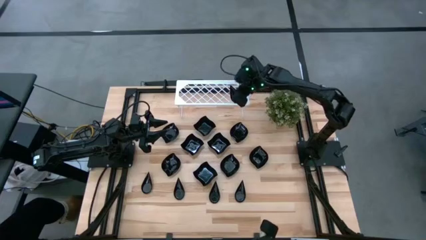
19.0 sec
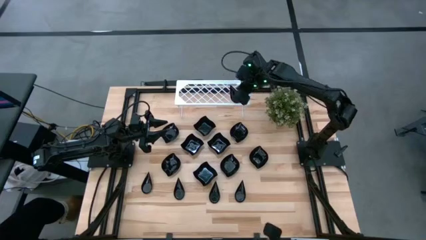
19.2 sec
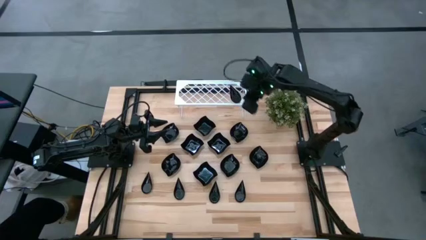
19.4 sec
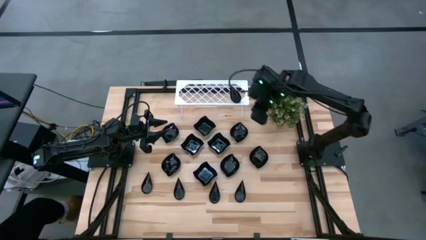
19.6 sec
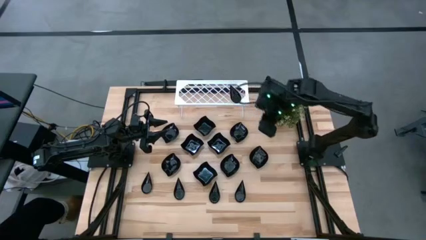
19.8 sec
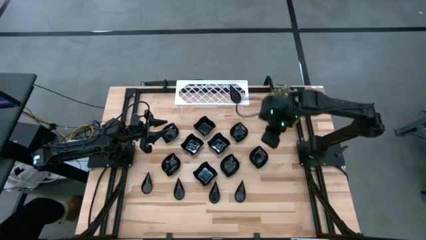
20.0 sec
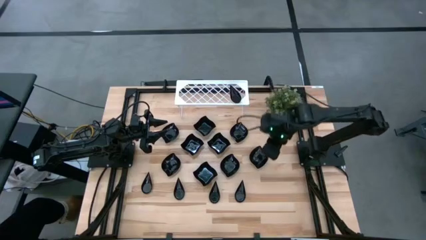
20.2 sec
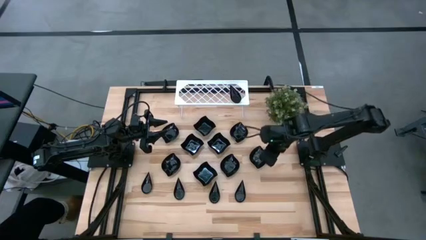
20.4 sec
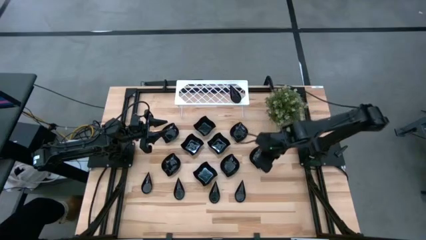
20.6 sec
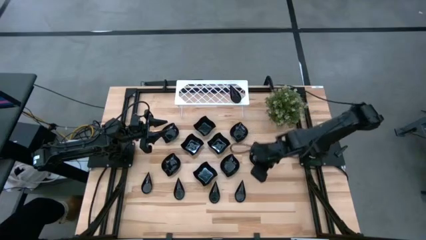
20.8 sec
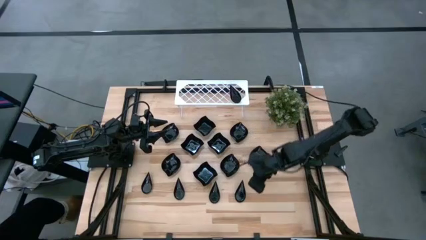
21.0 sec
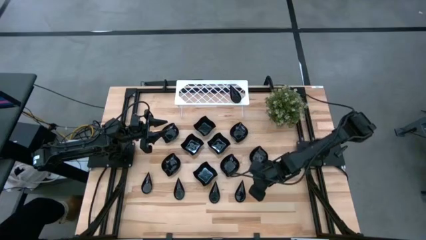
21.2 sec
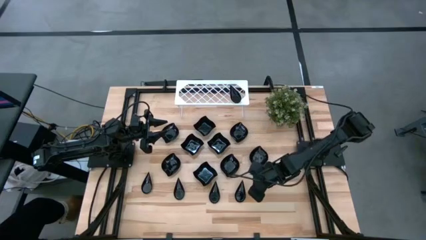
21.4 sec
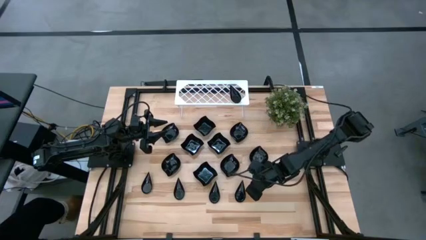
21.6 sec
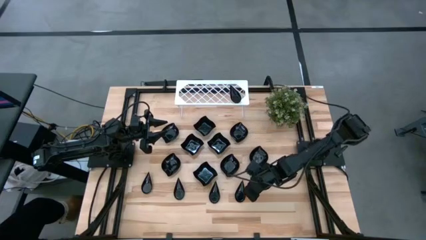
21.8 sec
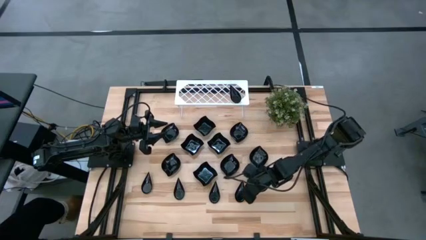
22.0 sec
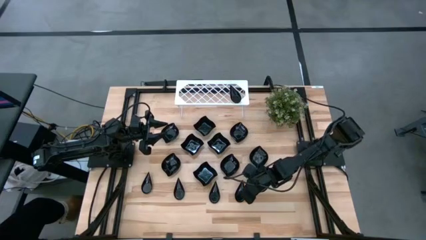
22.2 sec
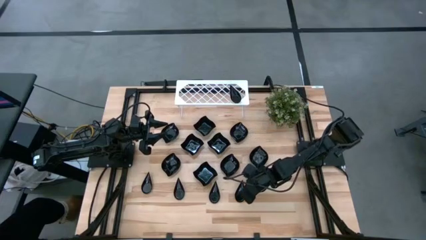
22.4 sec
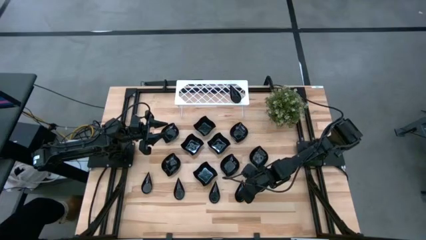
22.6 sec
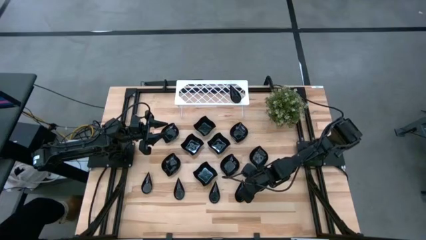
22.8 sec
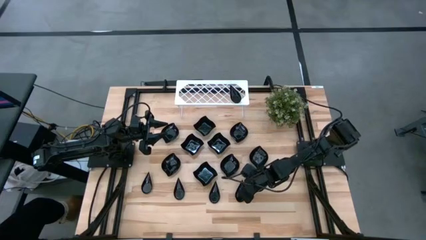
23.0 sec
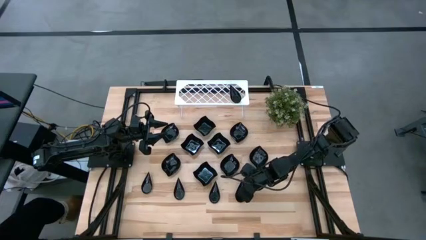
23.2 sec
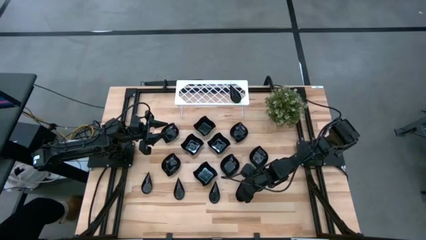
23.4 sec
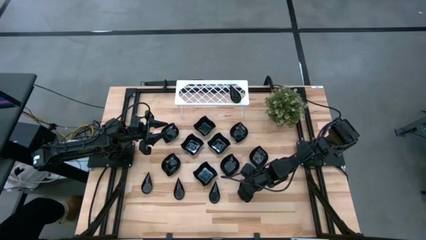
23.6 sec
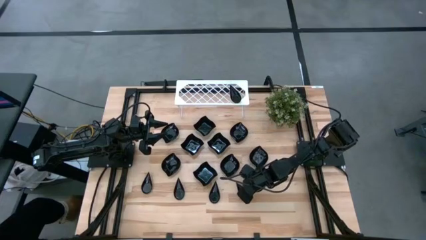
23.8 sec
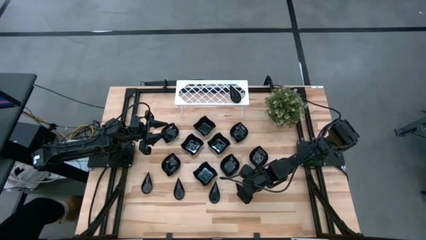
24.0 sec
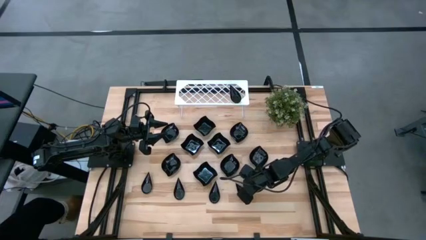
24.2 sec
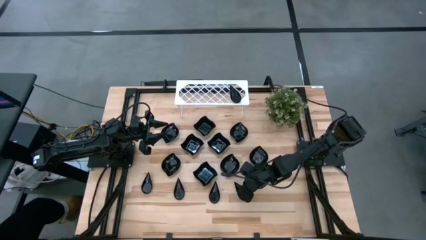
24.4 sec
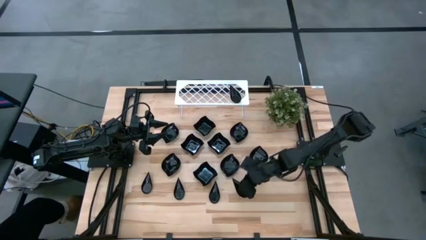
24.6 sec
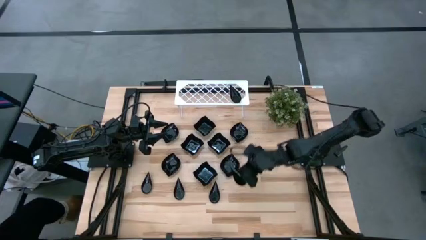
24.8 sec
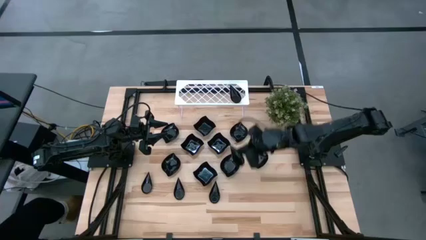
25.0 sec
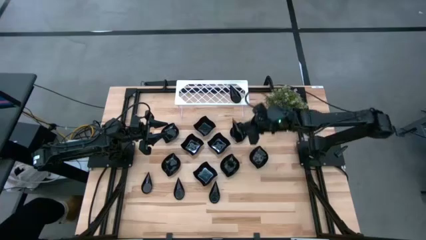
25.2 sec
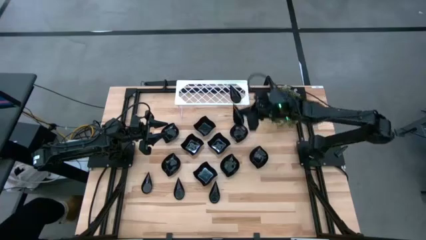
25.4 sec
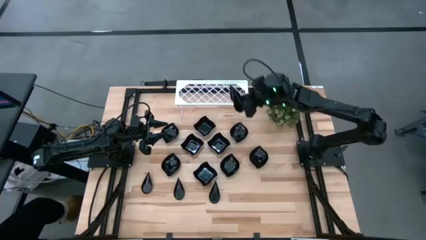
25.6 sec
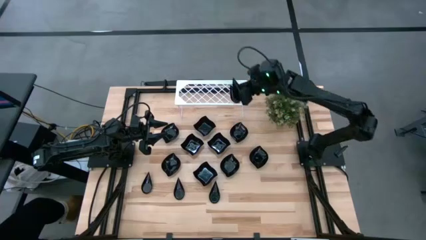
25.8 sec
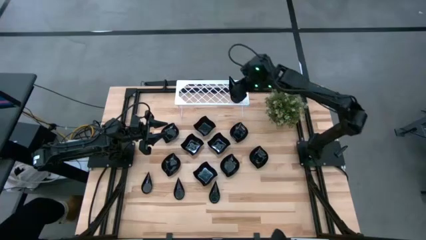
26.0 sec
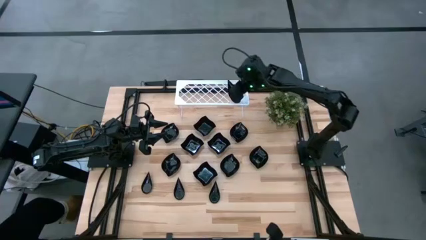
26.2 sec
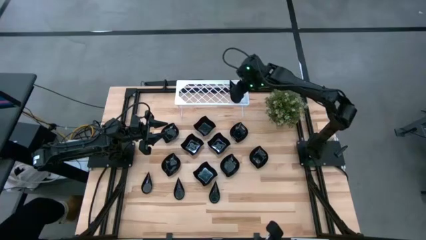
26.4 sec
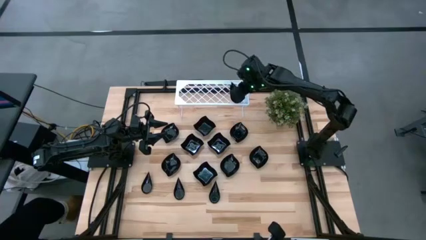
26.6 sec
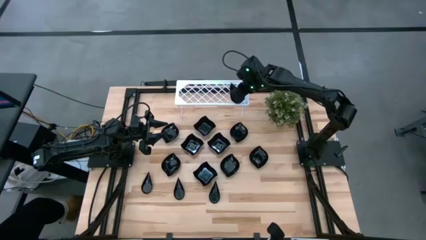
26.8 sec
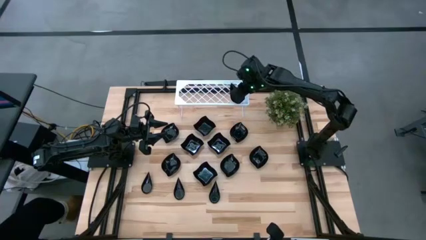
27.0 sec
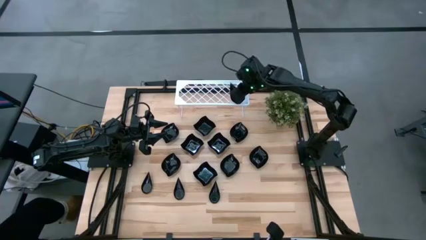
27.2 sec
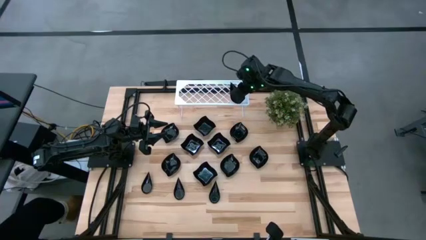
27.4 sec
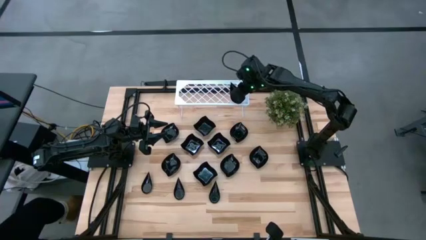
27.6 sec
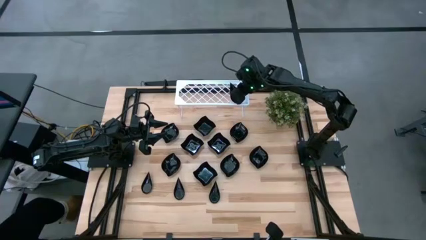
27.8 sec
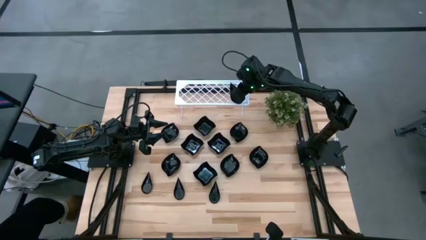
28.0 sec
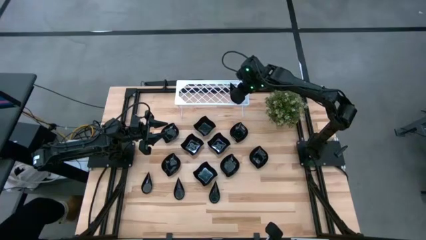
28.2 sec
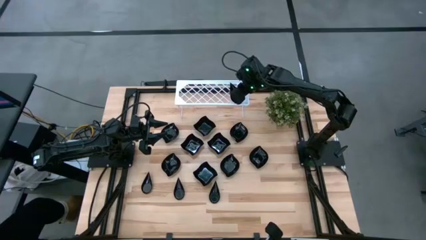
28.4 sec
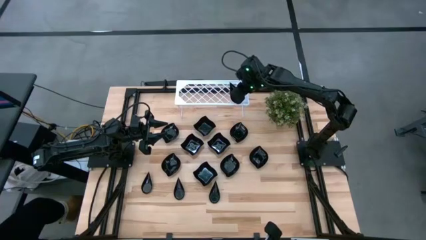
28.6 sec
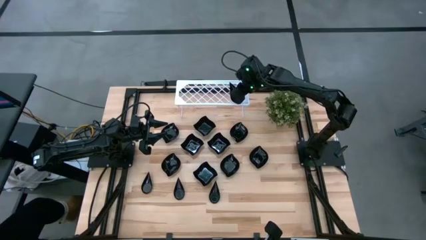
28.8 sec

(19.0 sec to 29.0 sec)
Task: Pick & Place Mini shaped plates
Stack the drop-shaped plate on top of the other drop-shaped plate on the shelf
